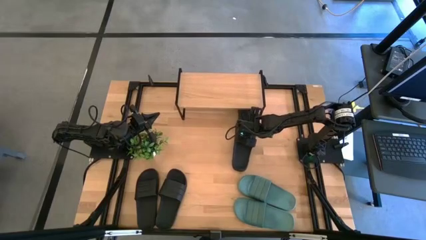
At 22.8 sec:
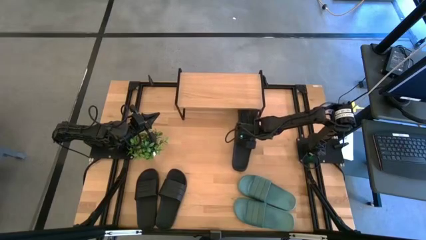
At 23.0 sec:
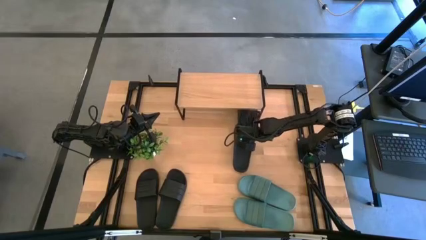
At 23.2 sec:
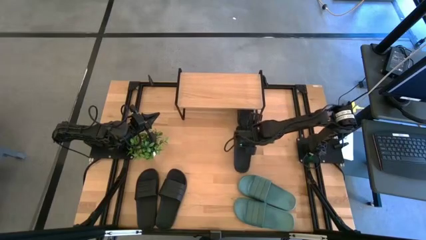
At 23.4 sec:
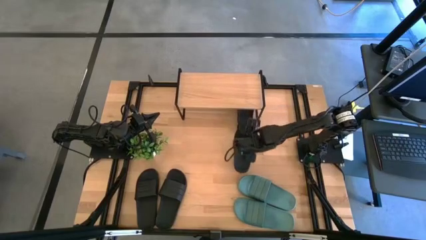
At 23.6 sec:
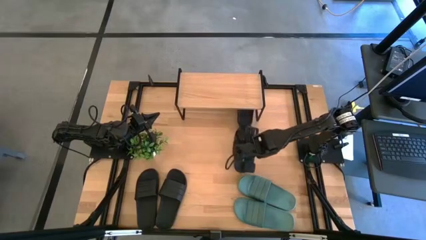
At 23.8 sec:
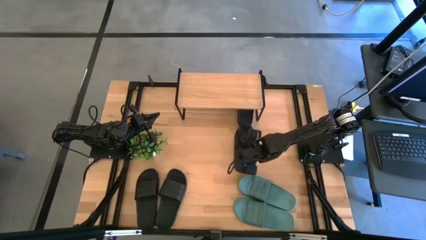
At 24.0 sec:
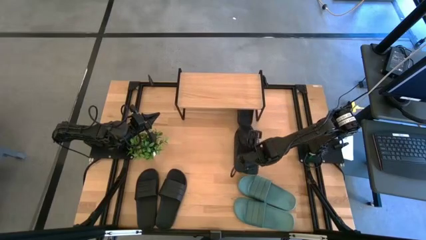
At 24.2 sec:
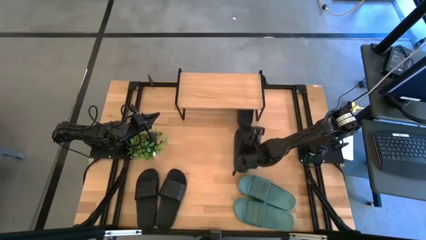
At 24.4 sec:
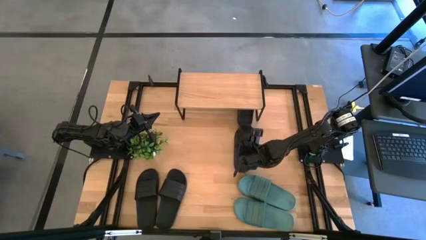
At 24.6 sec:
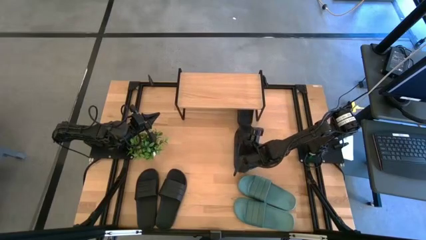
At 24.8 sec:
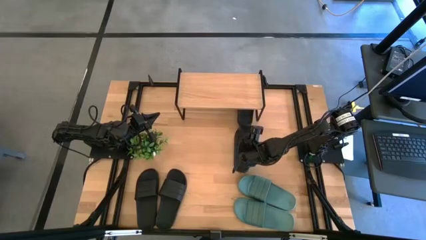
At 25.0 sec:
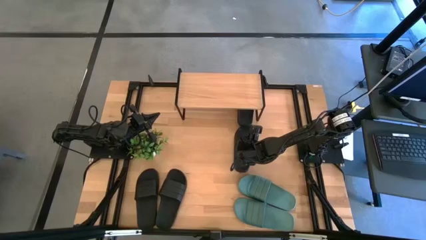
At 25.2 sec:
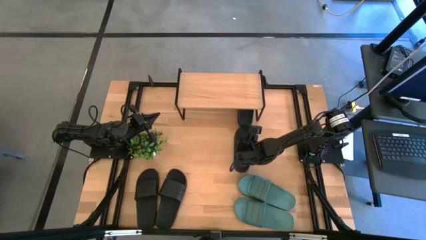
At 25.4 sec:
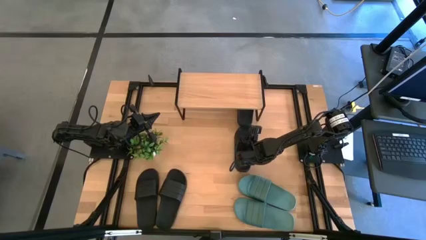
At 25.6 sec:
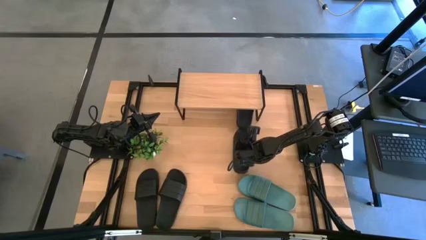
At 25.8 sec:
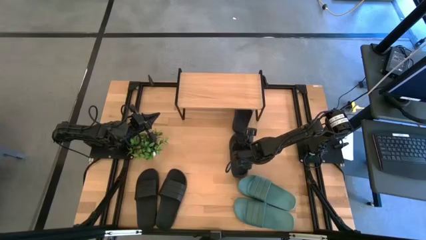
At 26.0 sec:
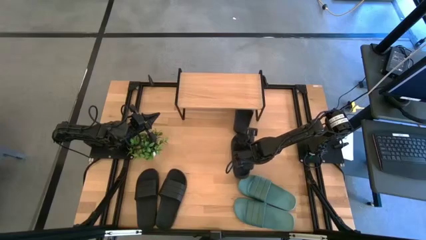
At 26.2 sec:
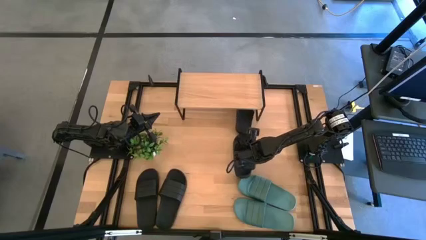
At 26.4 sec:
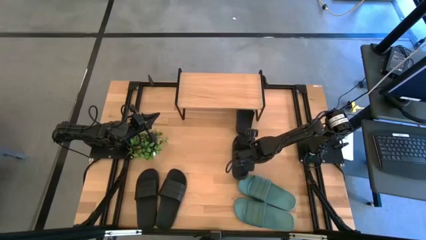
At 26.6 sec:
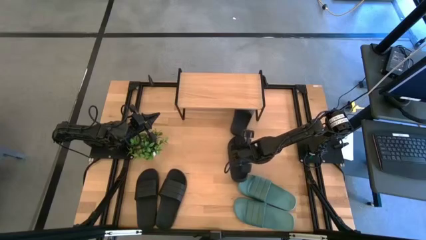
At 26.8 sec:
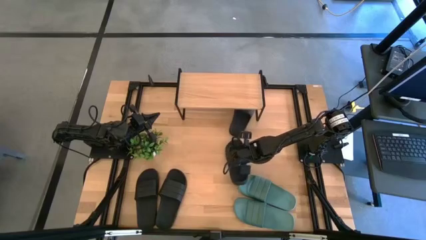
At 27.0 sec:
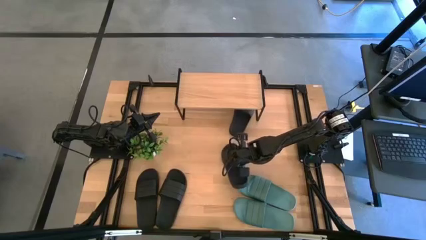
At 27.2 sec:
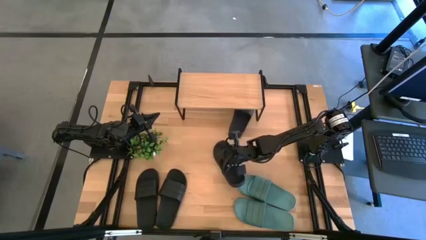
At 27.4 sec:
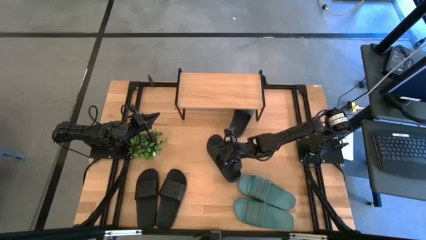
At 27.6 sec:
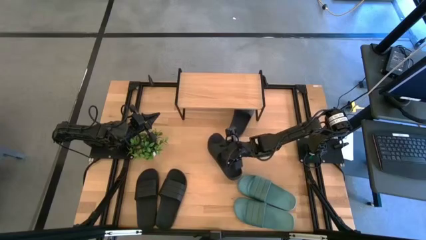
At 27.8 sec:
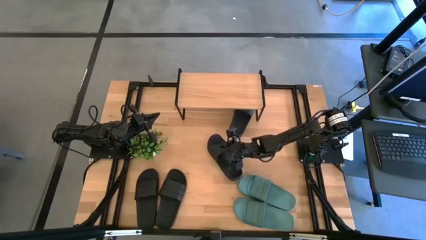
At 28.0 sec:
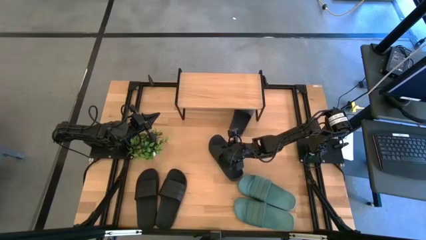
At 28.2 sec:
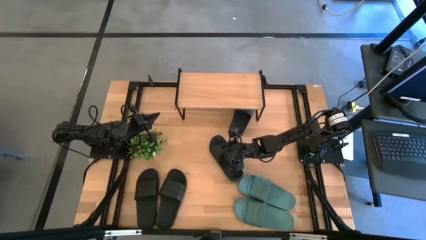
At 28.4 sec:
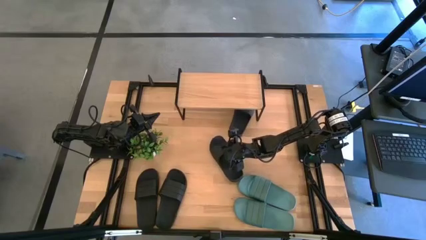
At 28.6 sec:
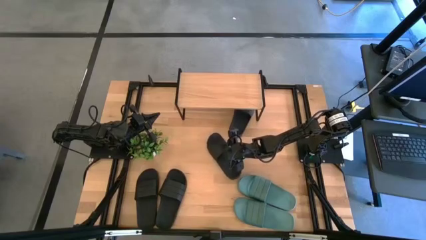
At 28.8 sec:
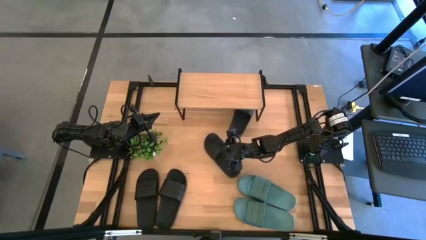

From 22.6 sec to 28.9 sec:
Task: Pick and place slides into the shelf
Move the black slide to the center of the table

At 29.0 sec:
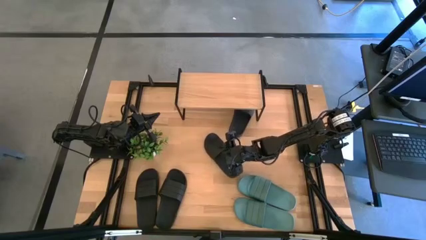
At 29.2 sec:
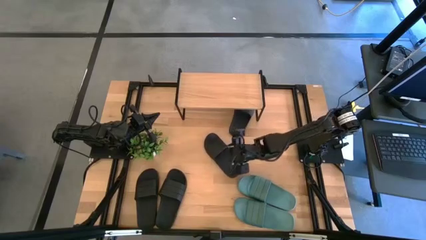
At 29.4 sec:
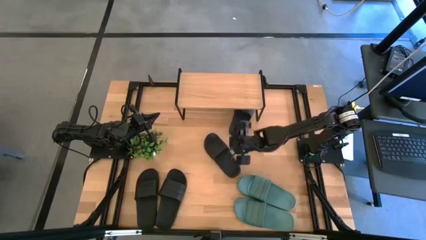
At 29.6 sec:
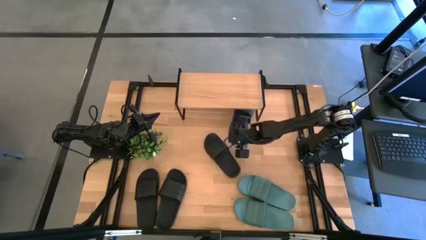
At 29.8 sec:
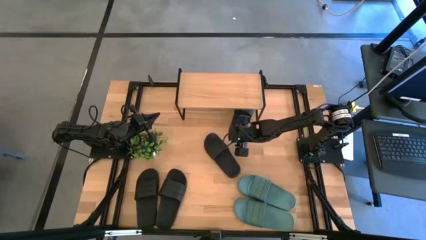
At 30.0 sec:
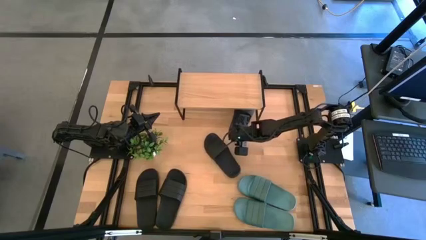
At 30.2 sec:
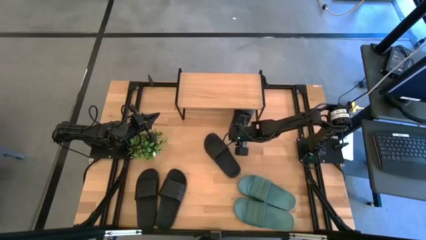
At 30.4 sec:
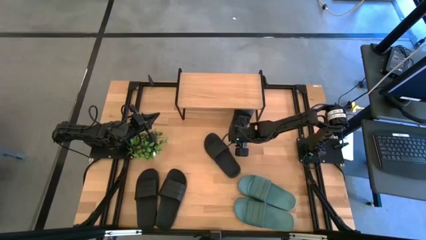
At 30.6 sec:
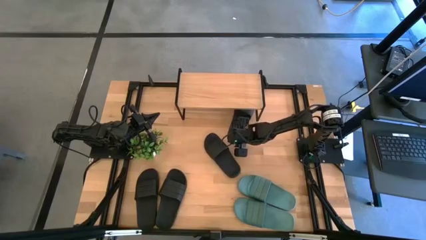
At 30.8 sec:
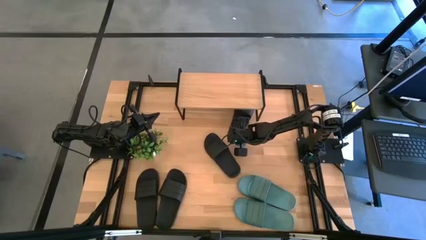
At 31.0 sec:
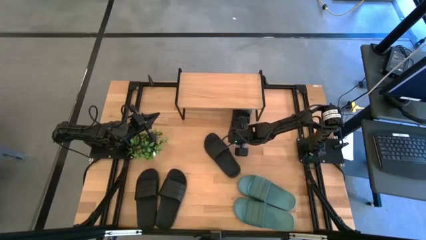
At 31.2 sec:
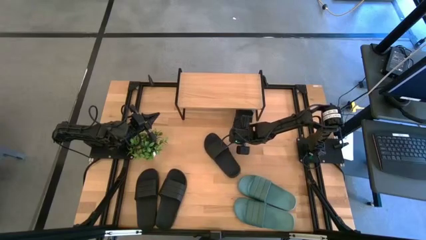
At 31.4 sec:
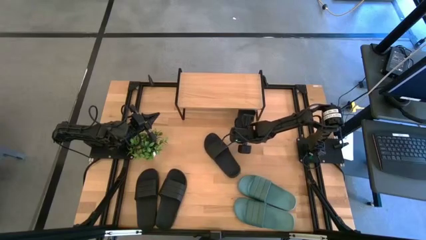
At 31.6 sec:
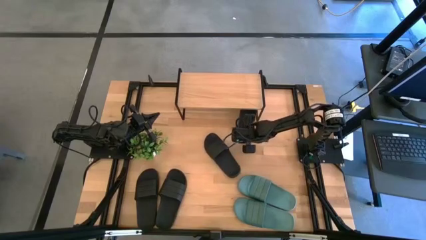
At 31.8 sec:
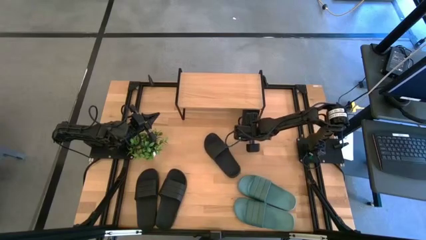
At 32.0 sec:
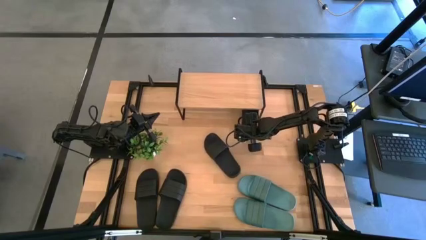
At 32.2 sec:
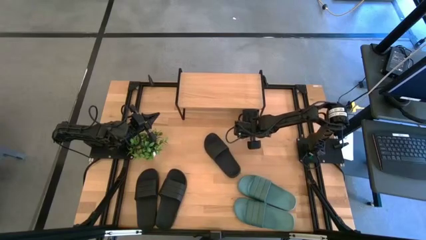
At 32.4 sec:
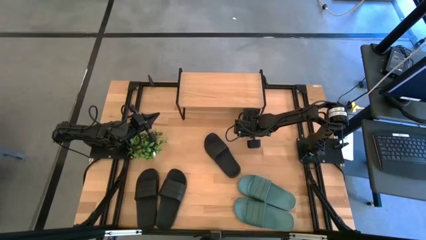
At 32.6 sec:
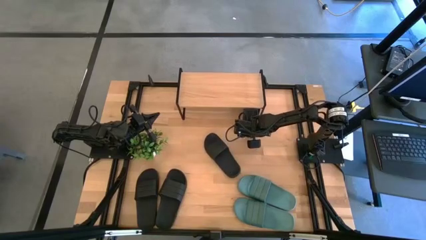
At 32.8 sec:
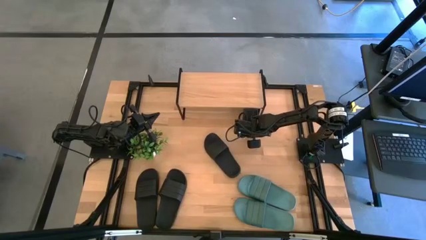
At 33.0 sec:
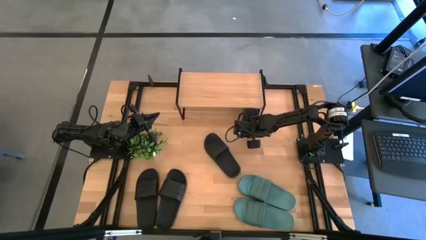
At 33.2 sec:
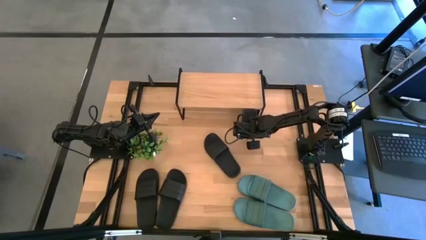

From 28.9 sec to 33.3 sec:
Adjust the black slide under the shelf
